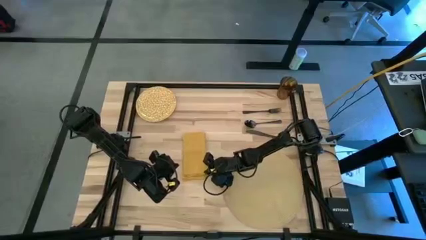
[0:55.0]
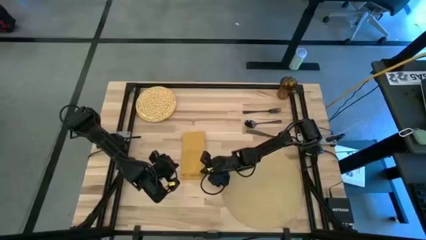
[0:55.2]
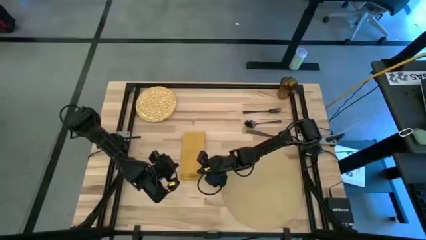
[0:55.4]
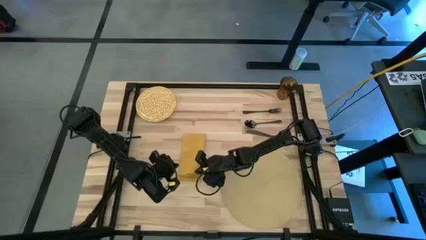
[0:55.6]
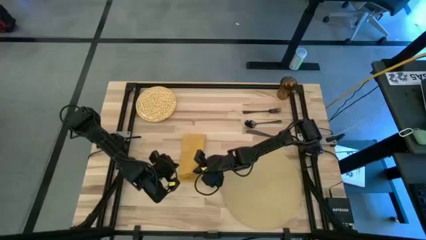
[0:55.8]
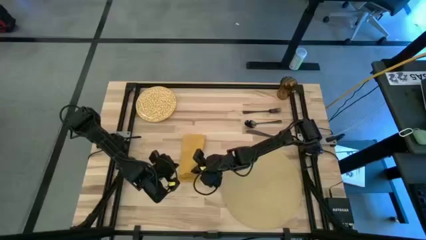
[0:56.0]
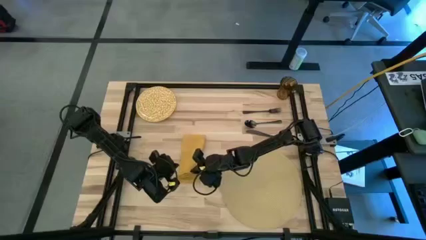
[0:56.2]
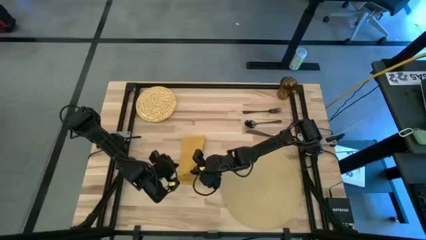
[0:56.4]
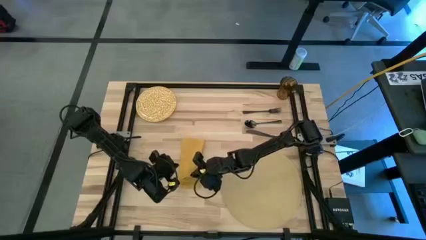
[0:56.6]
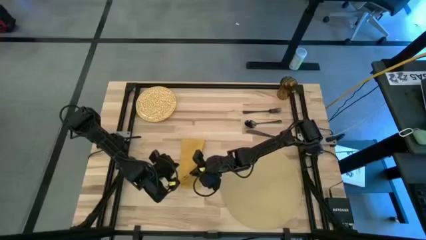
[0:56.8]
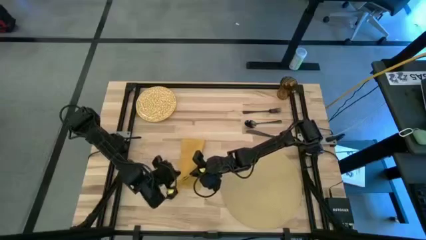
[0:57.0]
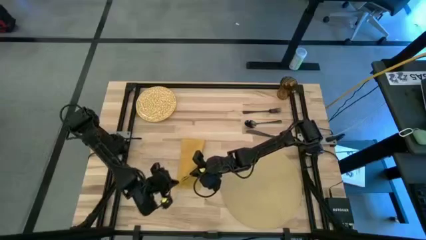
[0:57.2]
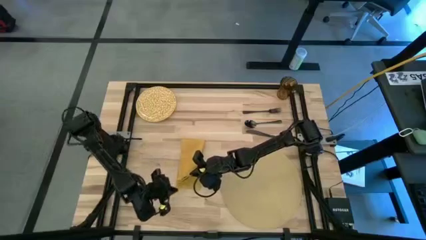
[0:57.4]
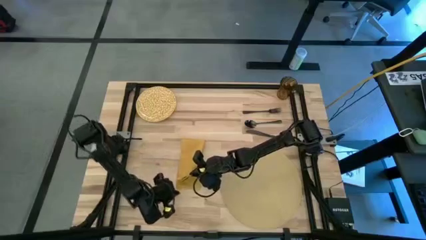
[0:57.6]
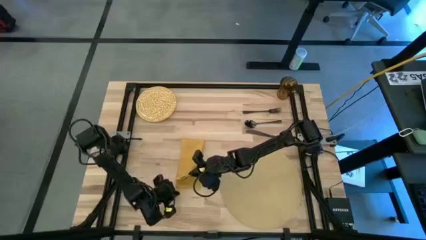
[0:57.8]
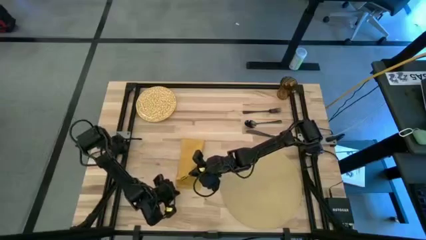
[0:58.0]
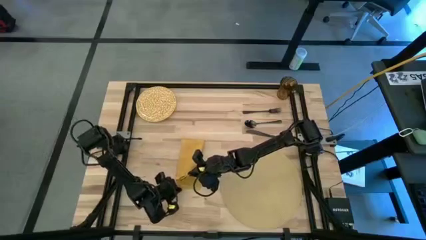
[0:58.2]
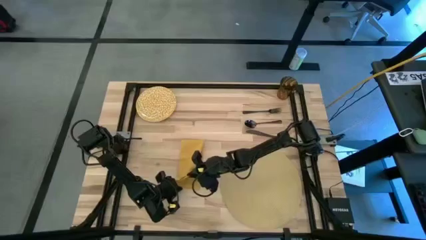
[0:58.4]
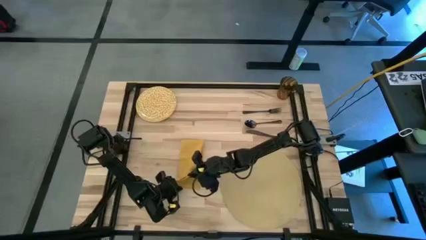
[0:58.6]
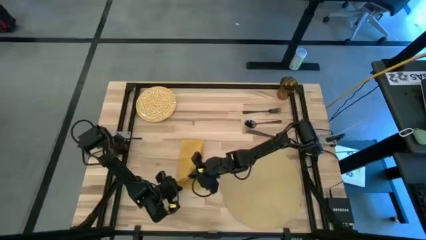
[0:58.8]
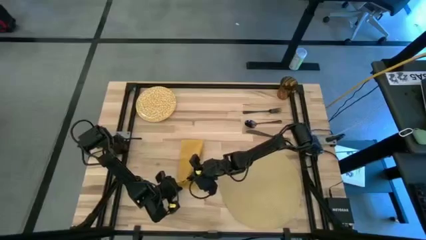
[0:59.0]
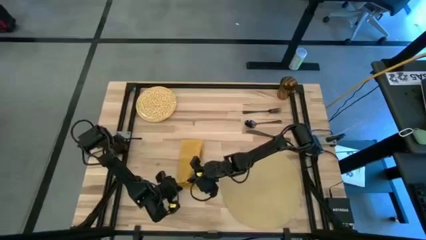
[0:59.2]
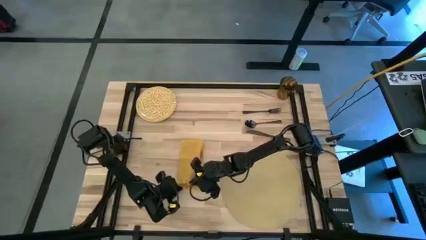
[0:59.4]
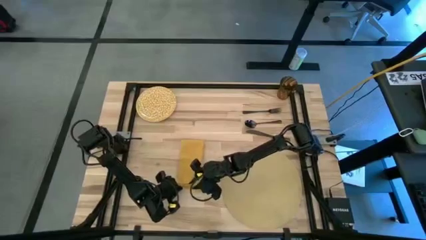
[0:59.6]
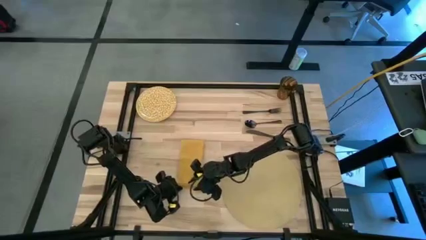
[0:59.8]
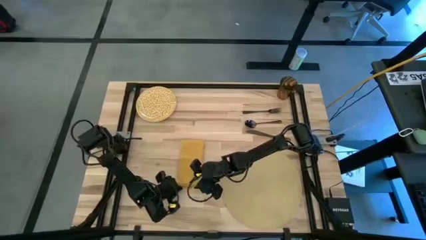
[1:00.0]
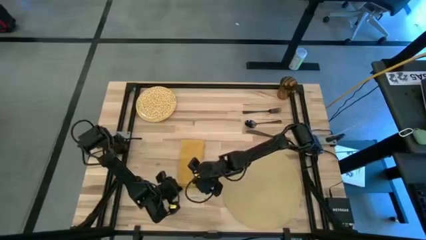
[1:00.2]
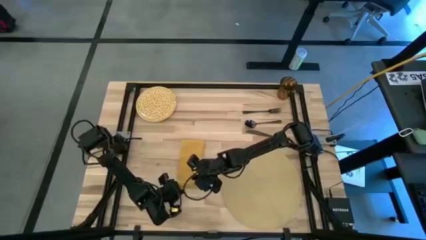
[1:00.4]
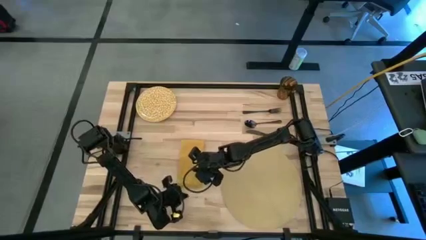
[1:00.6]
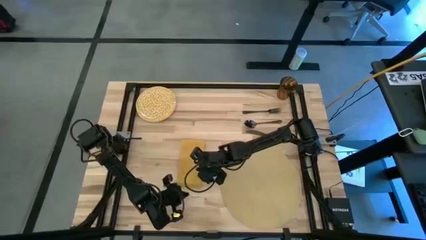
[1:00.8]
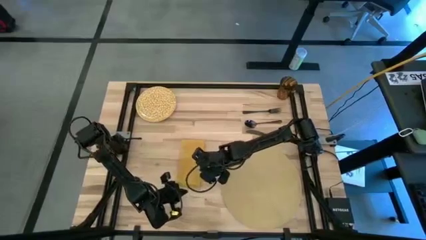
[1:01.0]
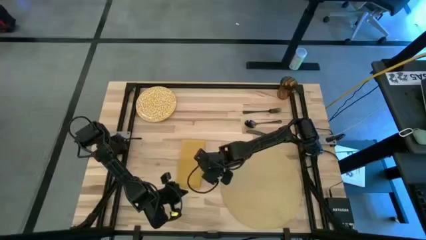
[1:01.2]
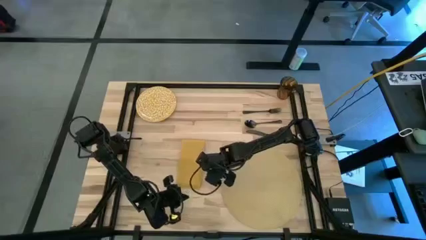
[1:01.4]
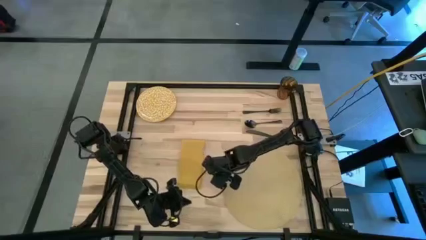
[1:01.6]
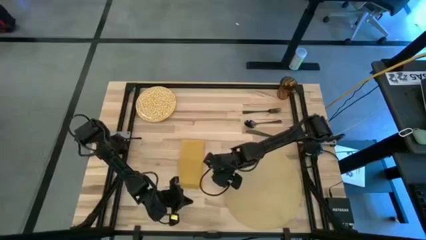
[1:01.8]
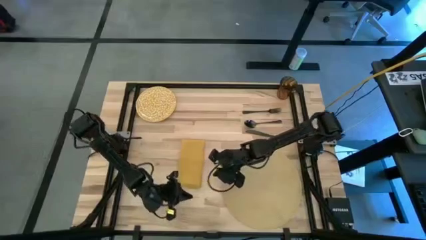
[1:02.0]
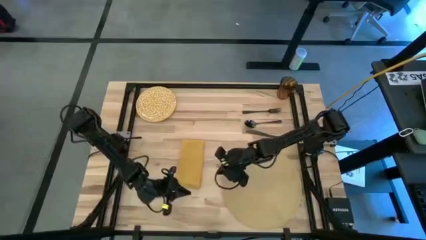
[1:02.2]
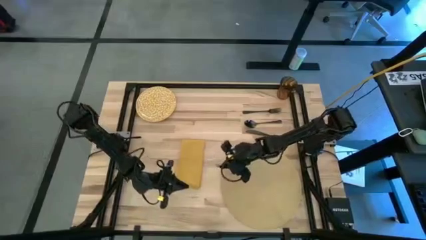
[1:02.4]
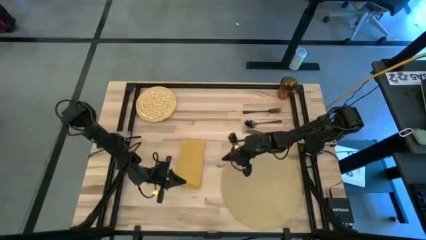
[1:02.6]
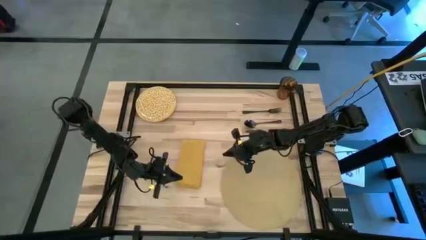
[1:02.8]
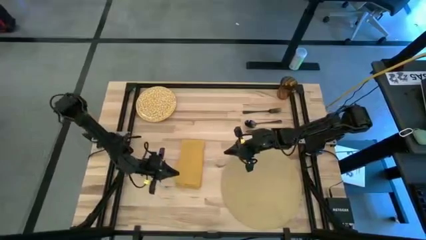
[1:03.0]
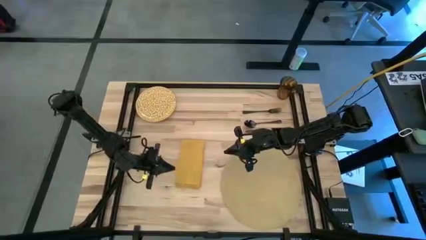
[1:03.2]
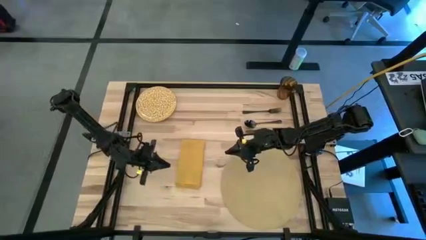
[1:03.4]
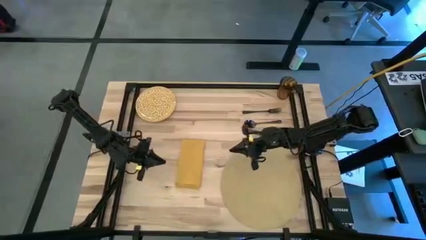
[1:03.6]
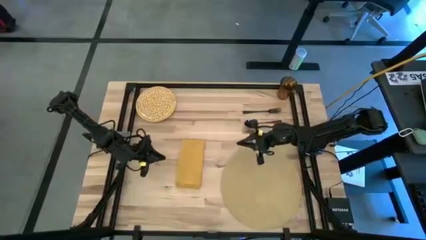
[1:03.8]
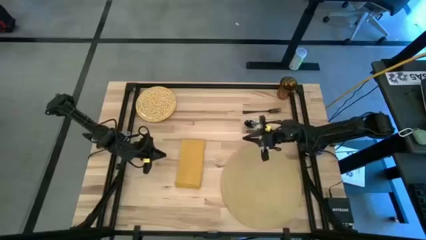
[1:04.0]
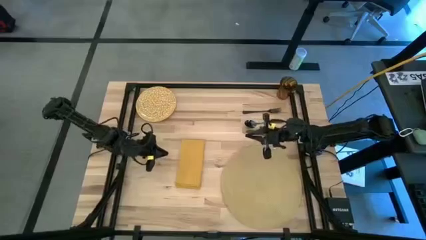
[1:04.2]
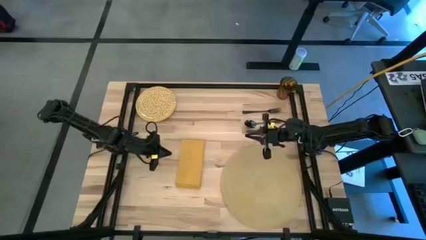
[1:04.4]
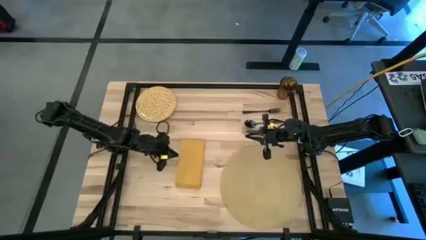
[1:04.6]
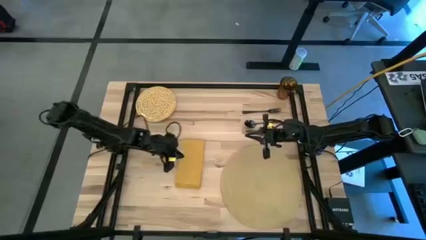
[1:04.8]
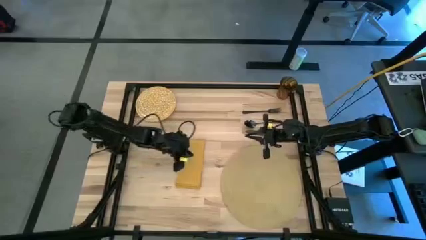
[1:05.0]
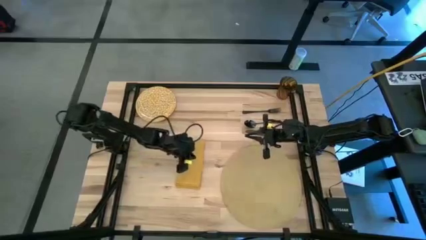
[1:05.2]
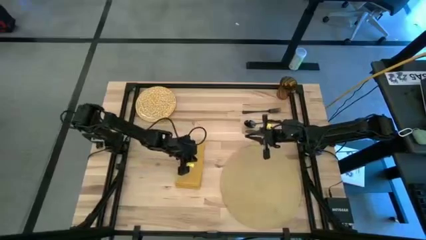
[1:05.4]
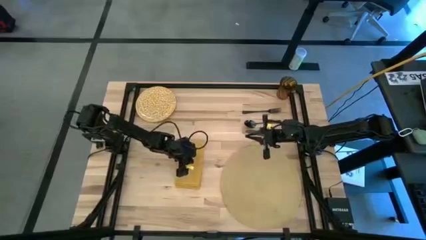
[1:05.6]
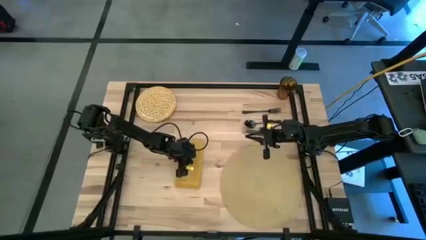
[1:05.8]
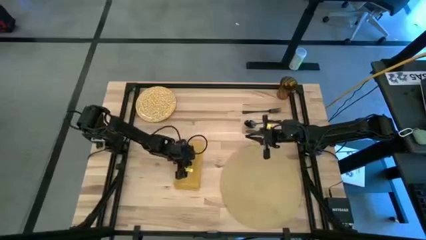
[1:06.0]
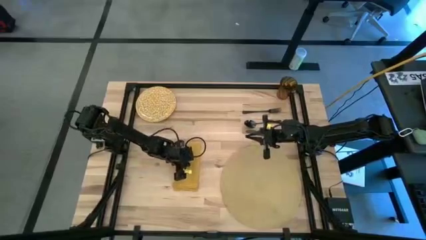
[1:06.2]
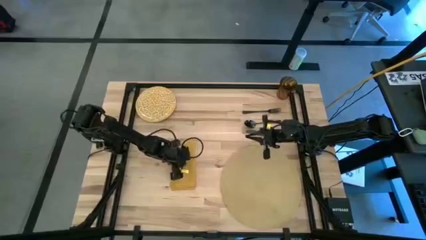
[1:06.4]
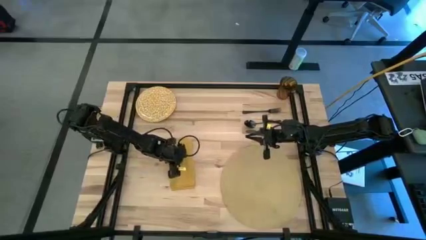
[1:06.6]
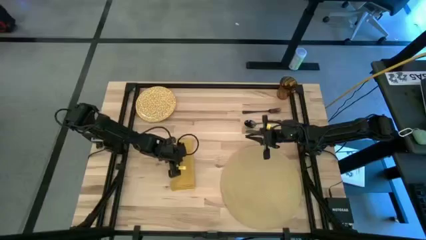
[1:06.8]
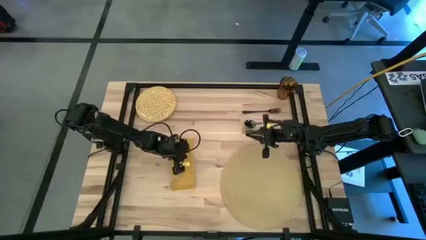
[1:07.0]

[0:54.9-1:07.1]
Task: Set table place
Fold the yellow table napkin
